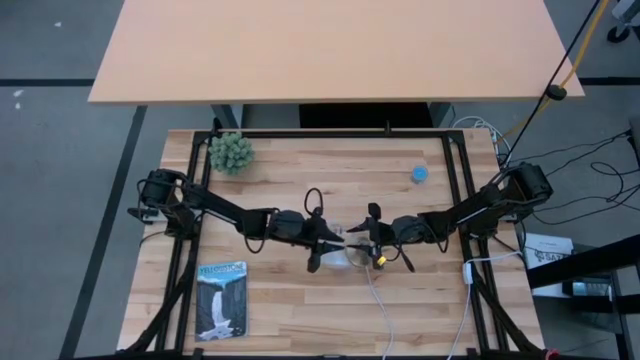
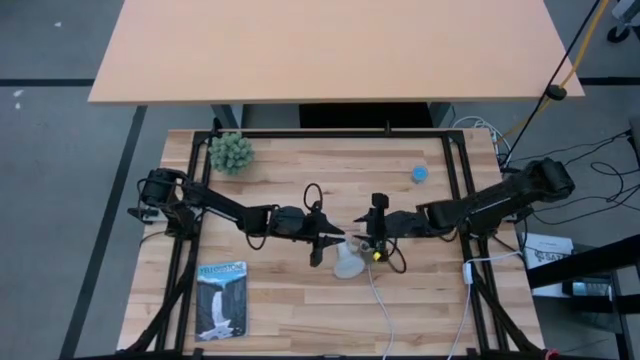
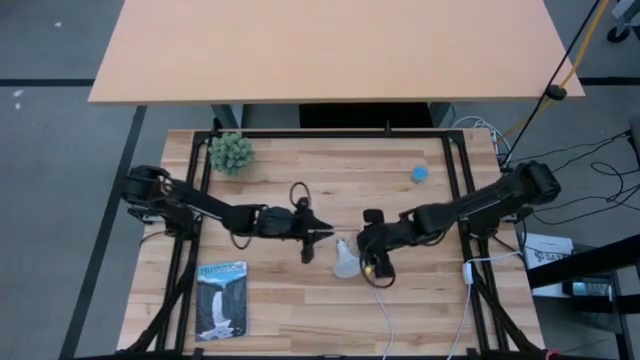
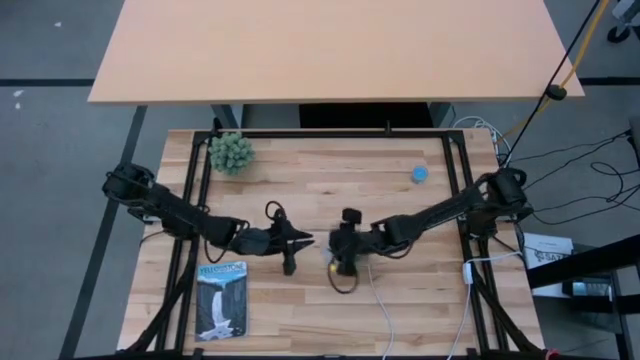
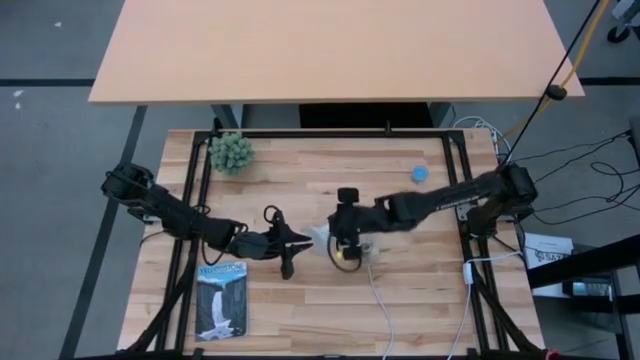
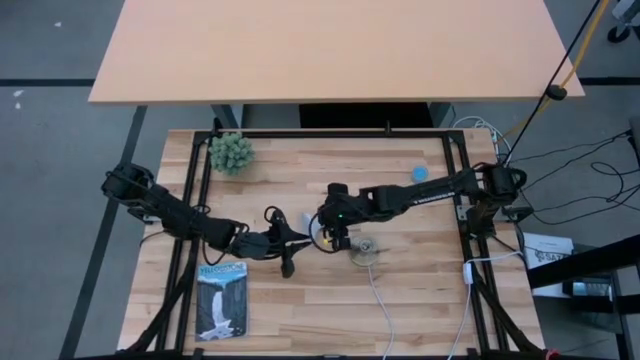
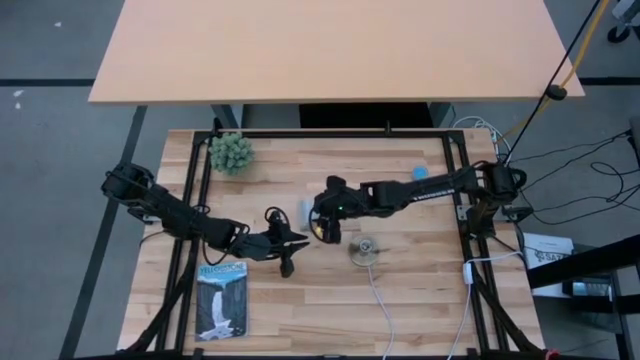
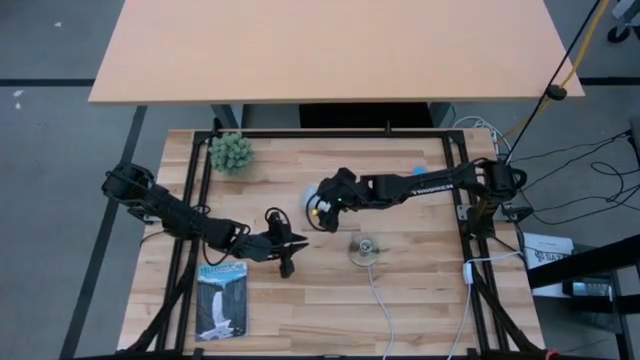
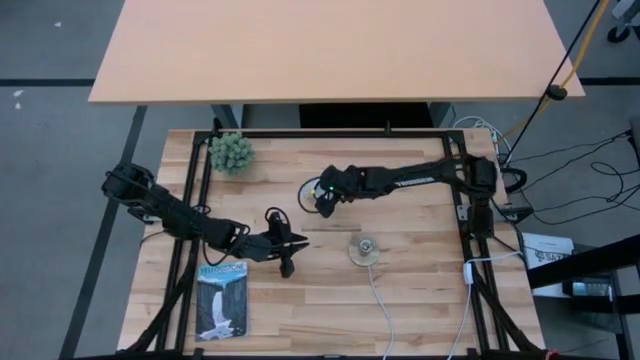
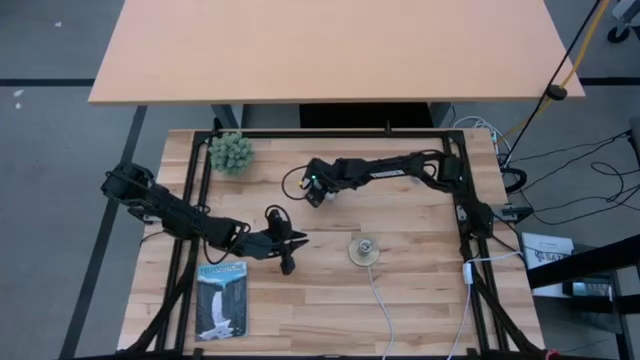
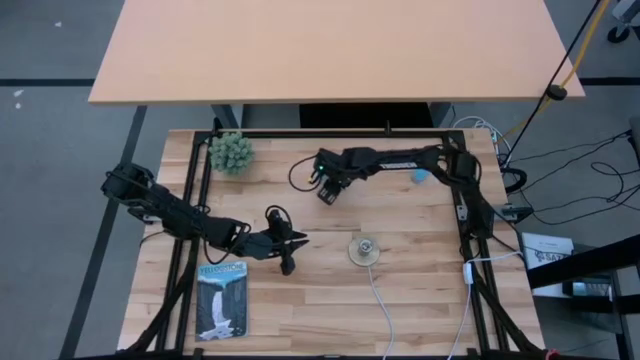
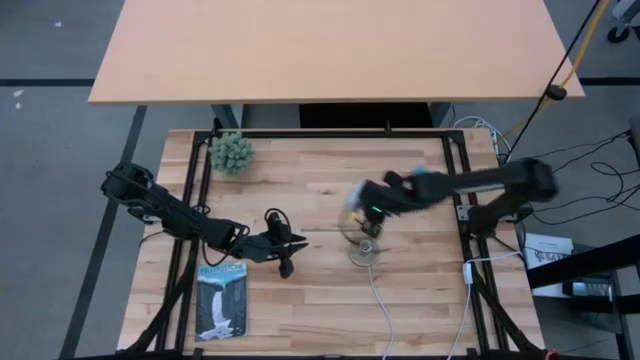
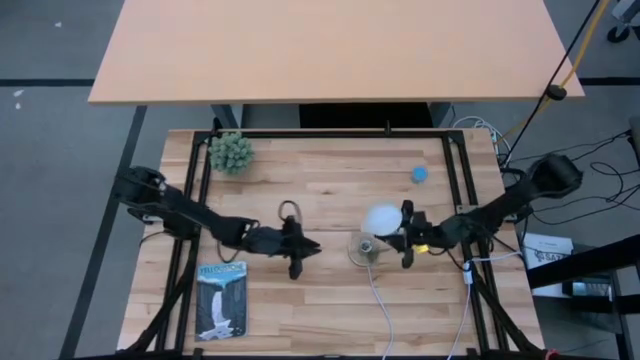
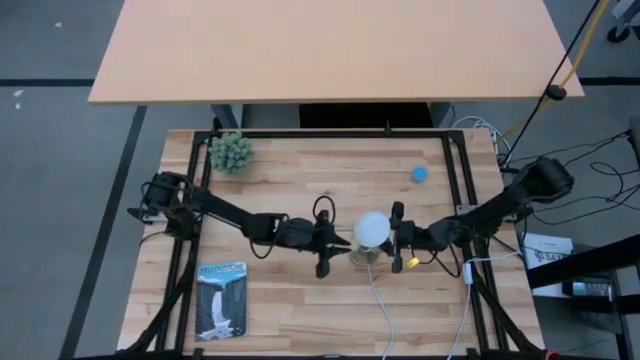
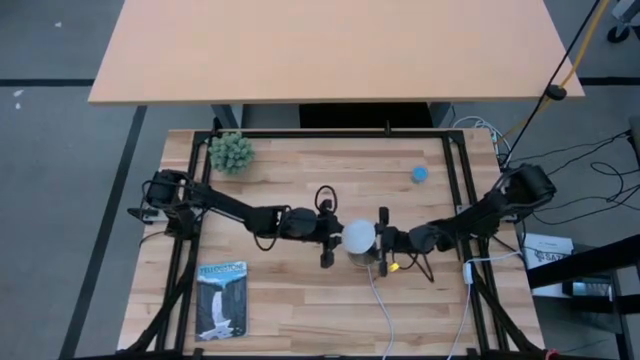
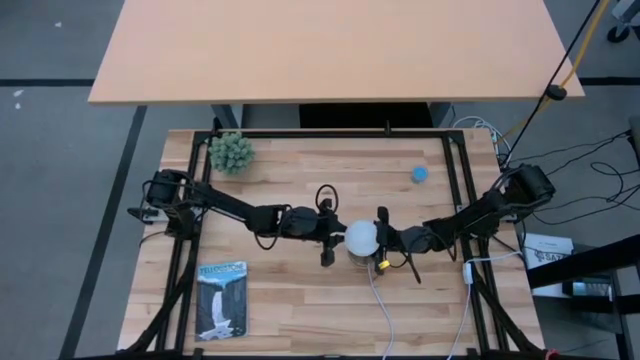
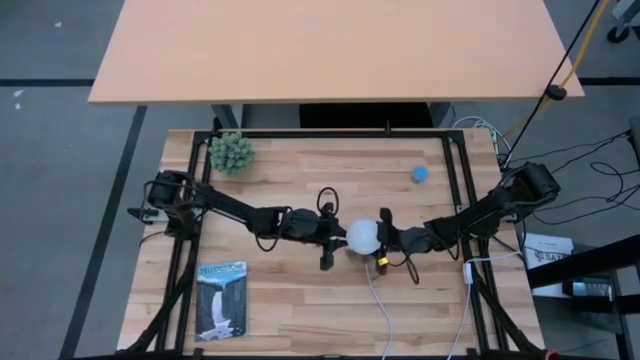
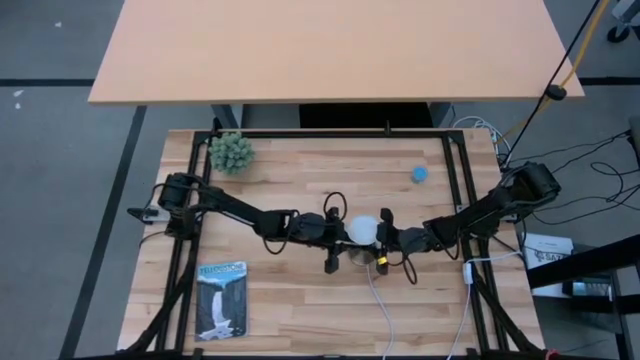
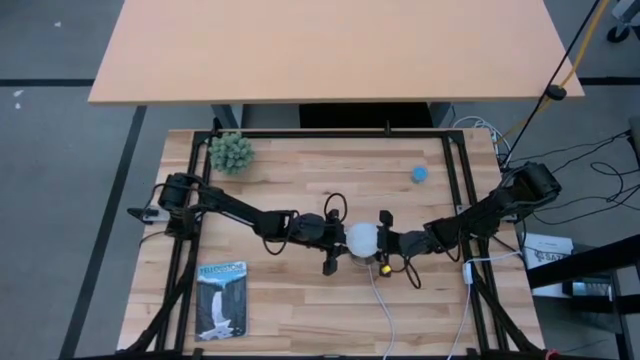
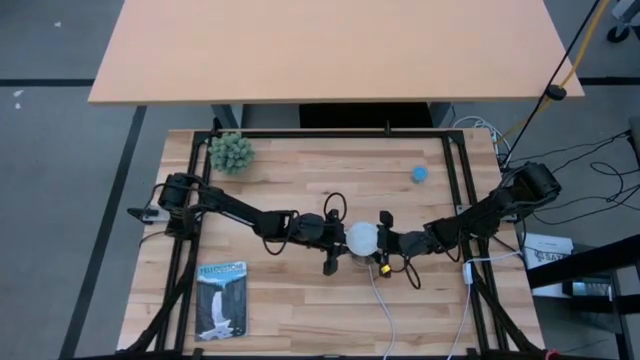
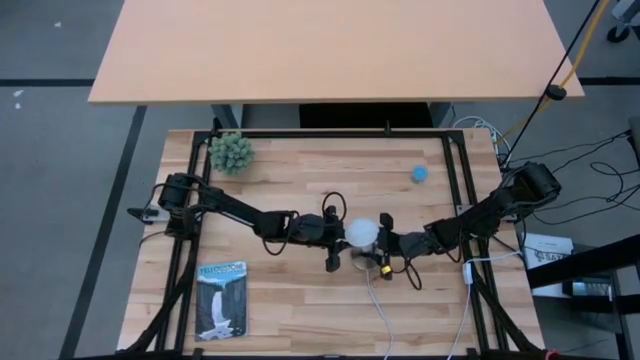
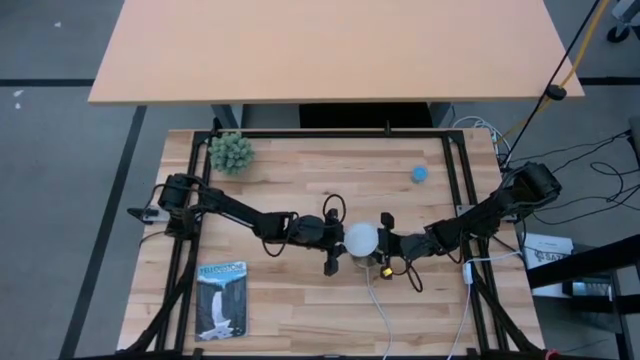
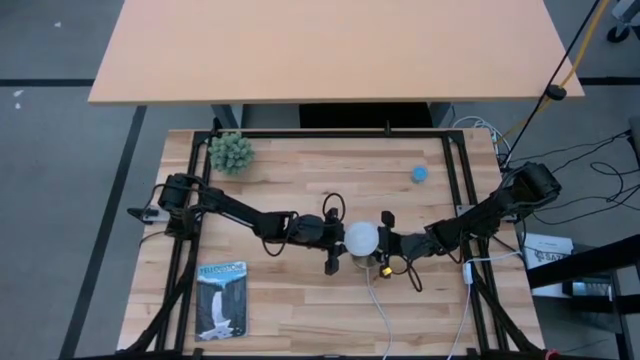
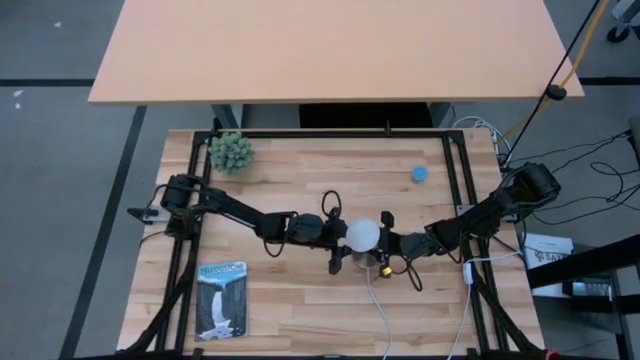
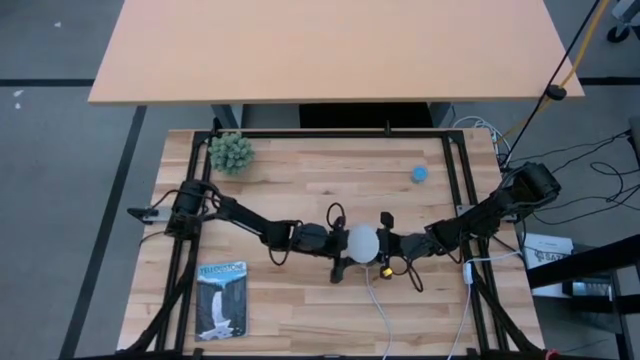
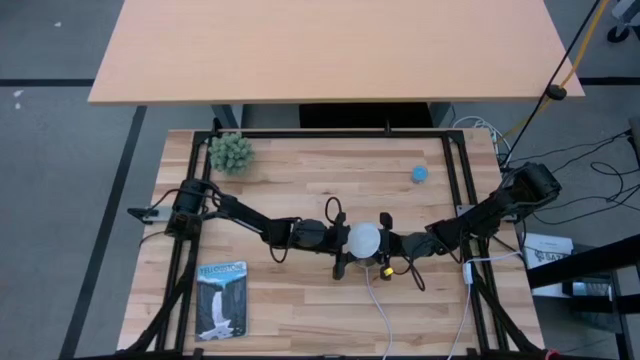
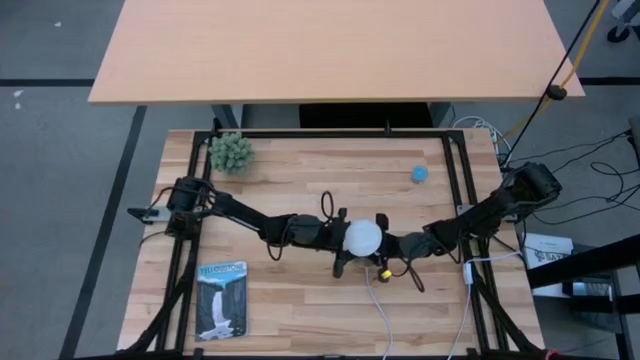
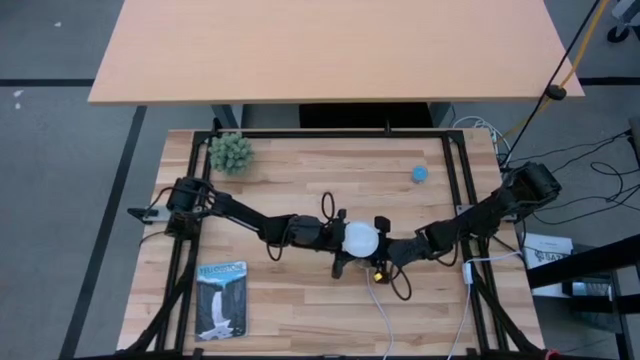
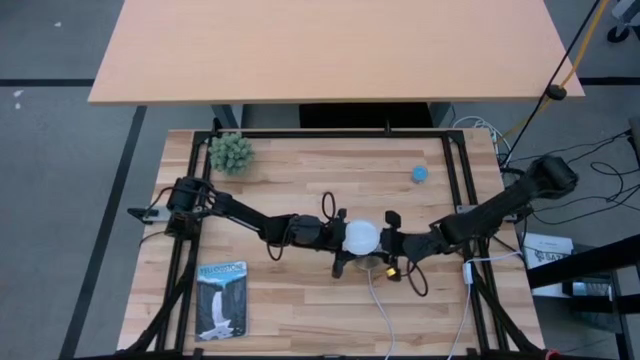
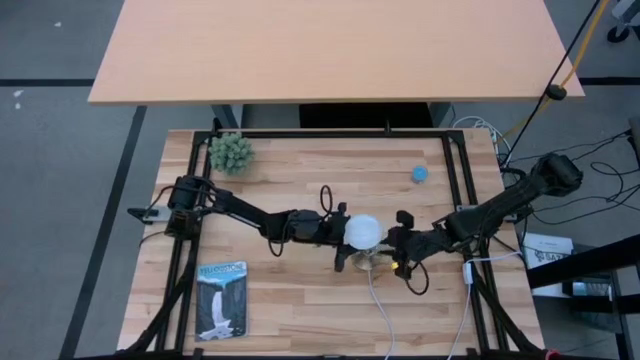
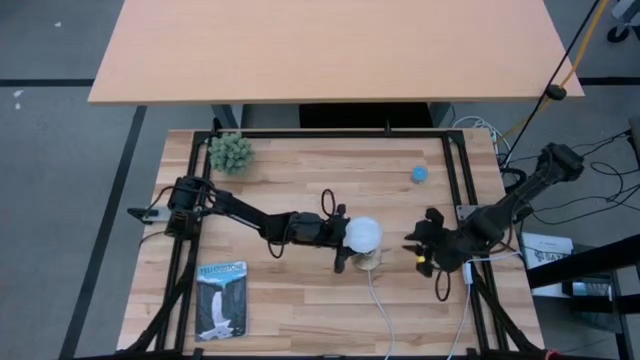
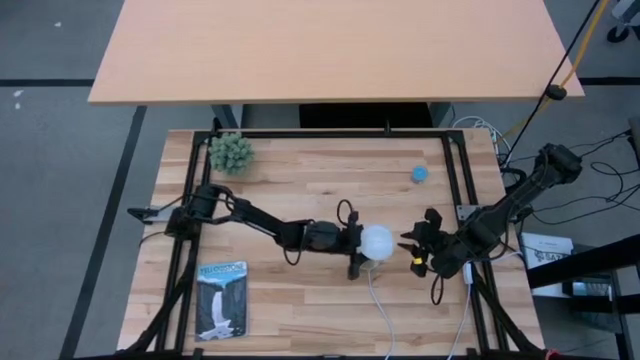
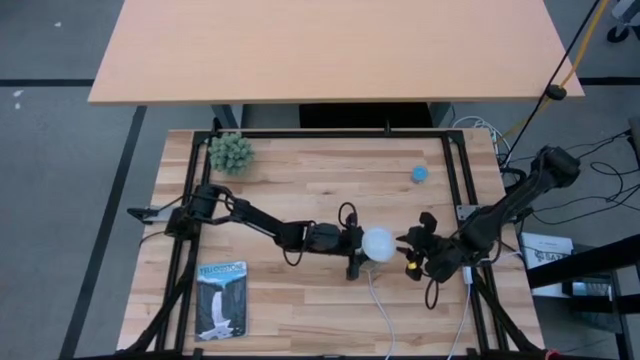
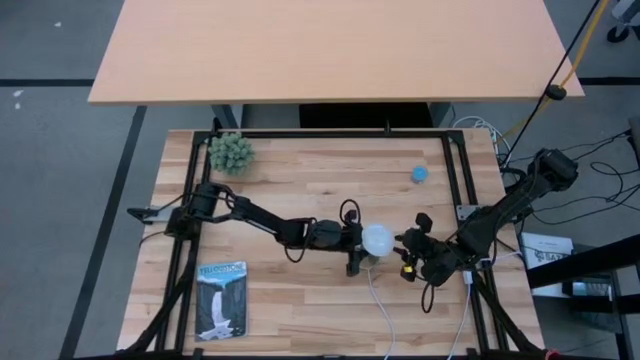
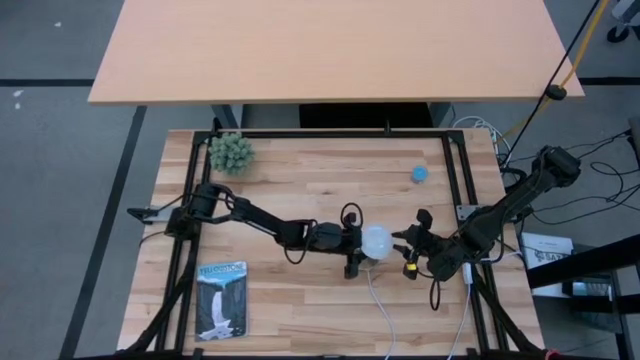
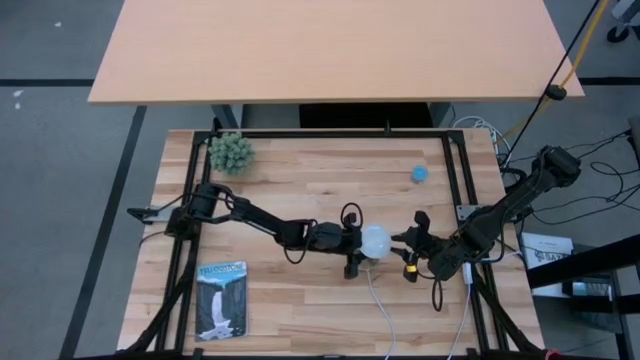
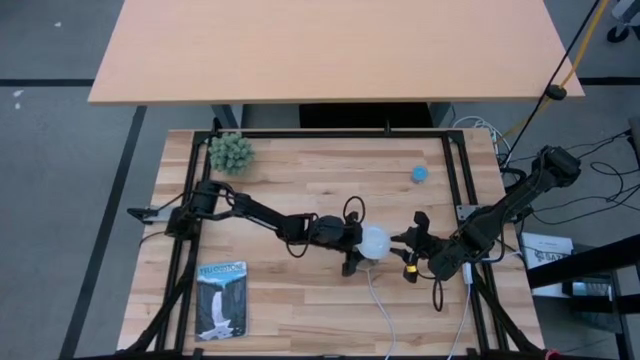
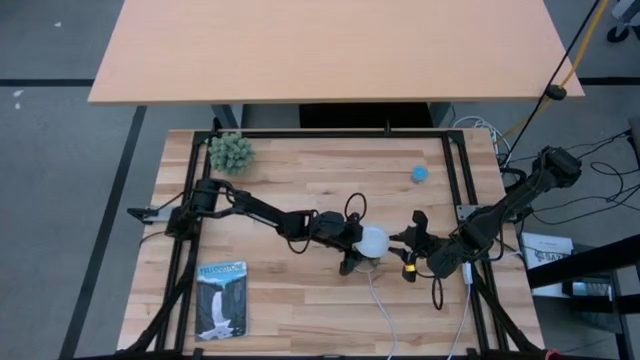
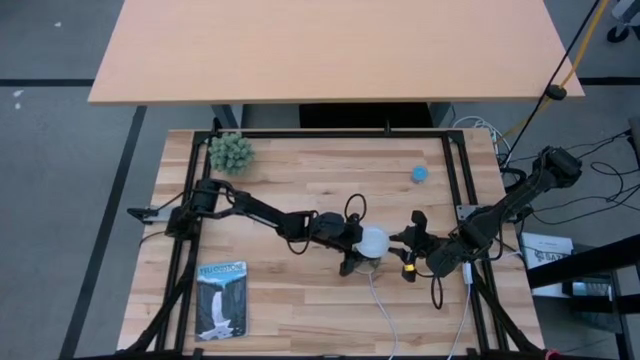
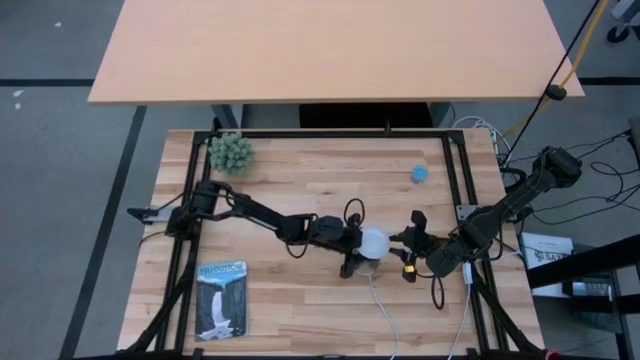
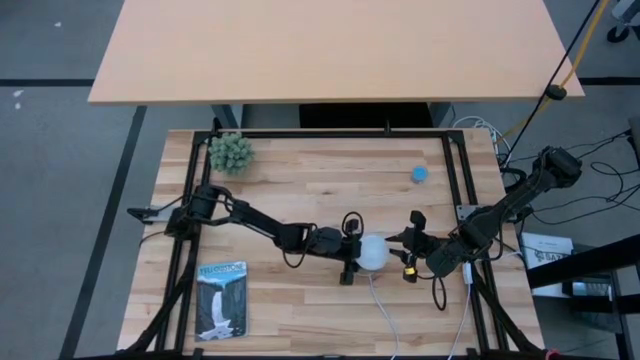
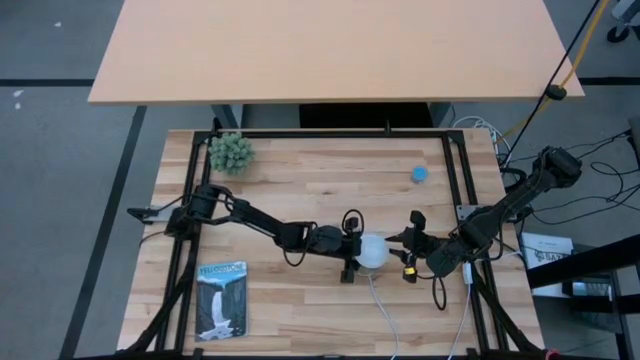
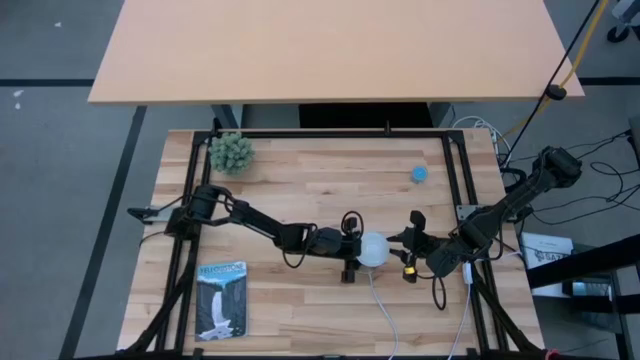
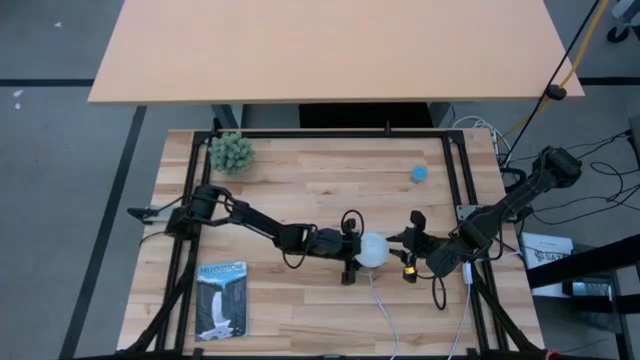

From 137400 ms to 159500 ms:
Task: Screw lightbulb
Insert the lightbulb into the desk lamp
